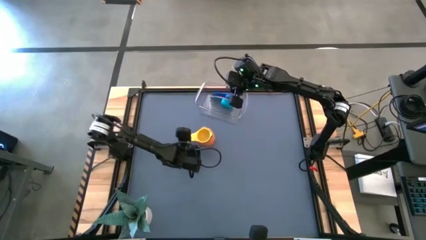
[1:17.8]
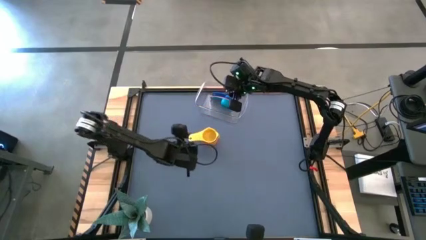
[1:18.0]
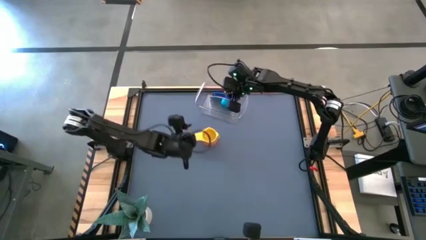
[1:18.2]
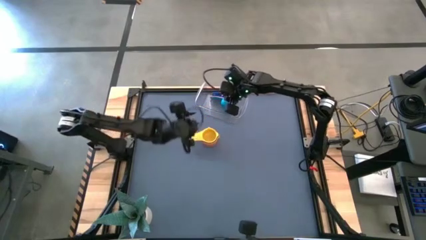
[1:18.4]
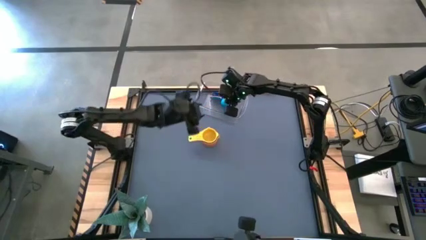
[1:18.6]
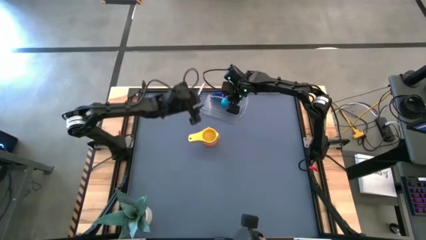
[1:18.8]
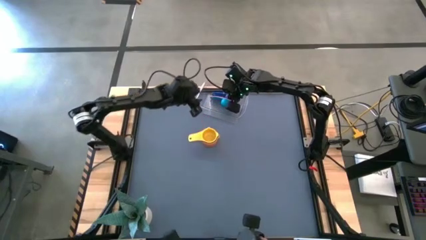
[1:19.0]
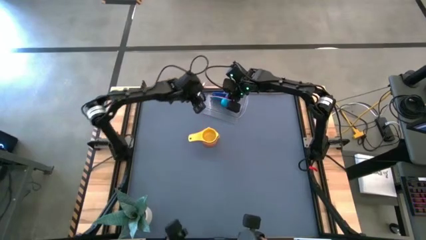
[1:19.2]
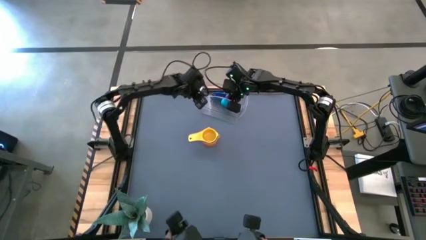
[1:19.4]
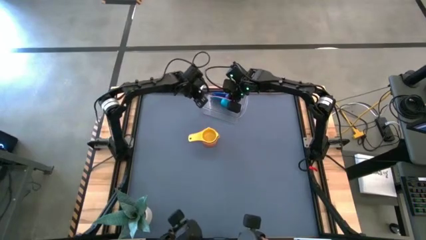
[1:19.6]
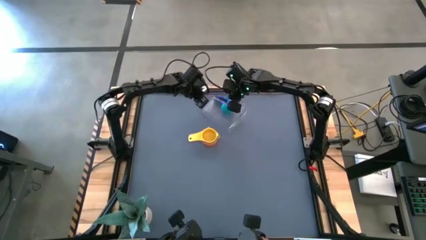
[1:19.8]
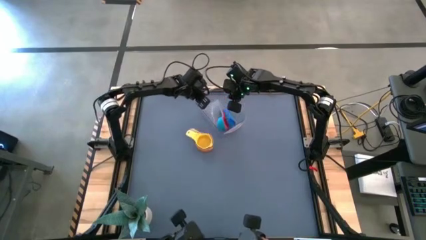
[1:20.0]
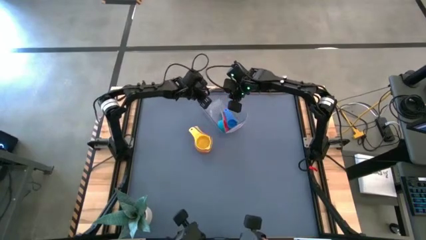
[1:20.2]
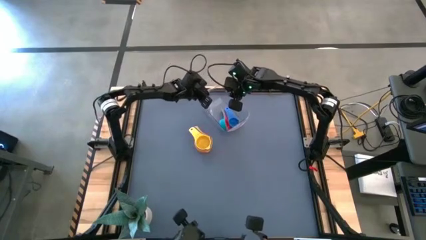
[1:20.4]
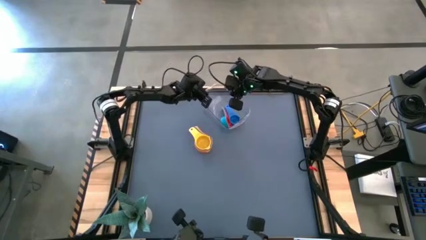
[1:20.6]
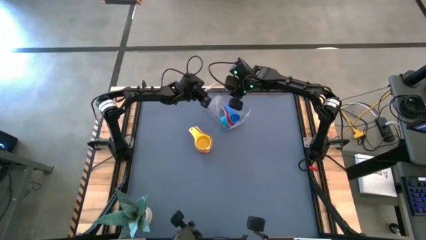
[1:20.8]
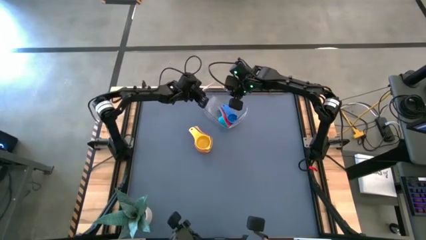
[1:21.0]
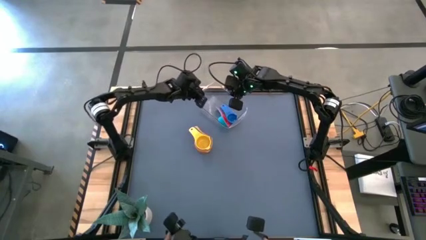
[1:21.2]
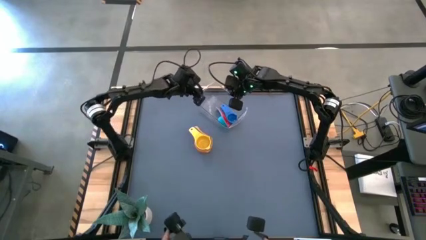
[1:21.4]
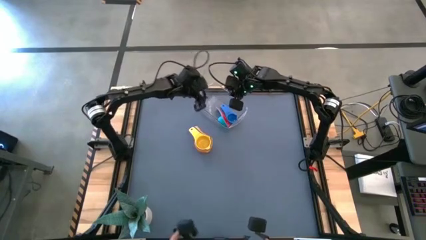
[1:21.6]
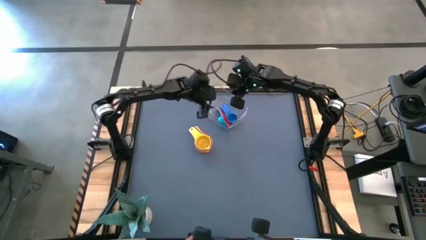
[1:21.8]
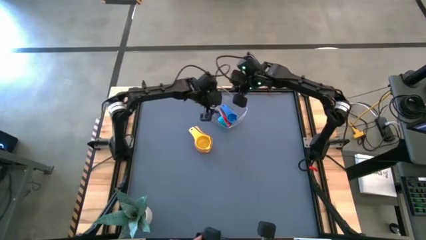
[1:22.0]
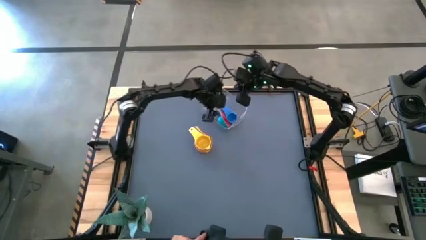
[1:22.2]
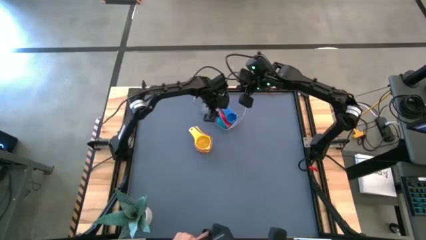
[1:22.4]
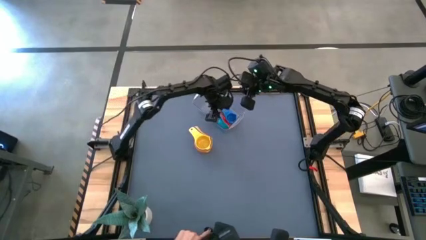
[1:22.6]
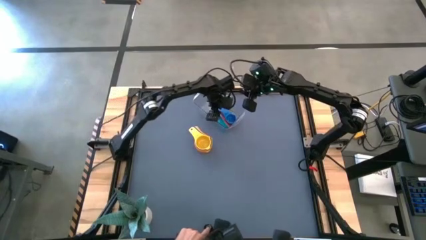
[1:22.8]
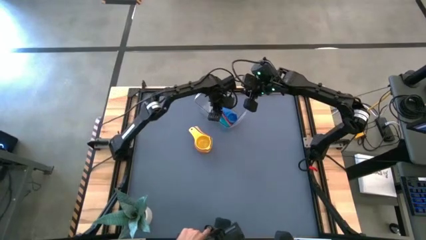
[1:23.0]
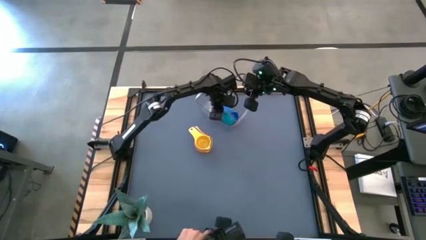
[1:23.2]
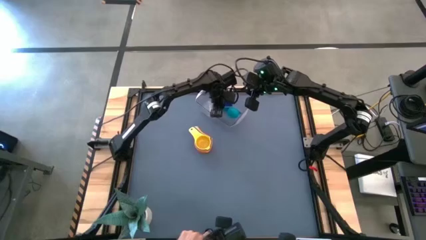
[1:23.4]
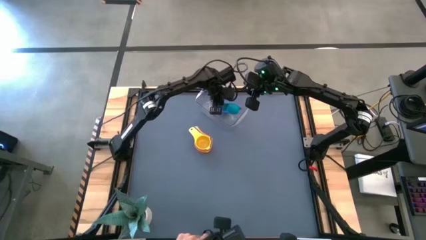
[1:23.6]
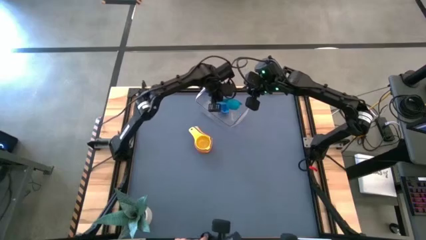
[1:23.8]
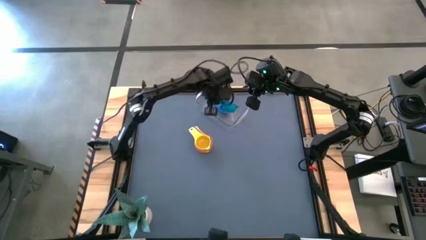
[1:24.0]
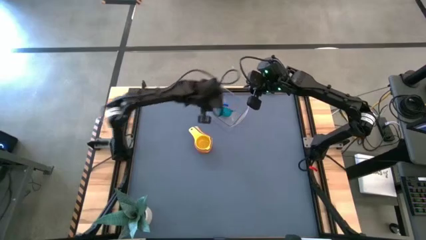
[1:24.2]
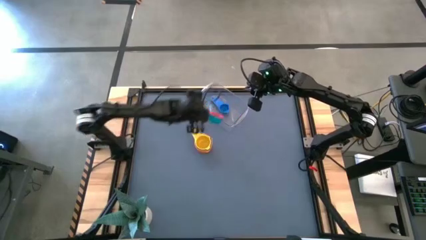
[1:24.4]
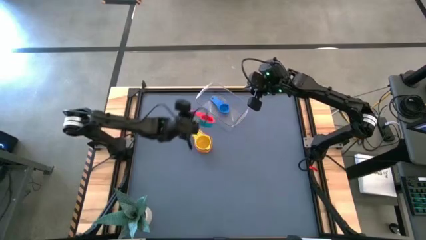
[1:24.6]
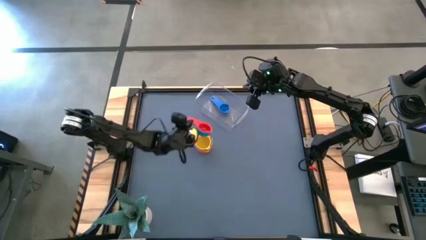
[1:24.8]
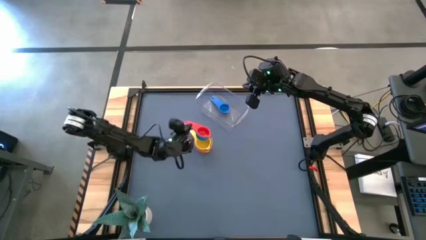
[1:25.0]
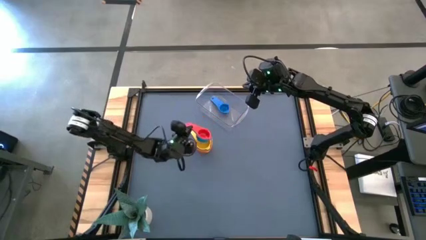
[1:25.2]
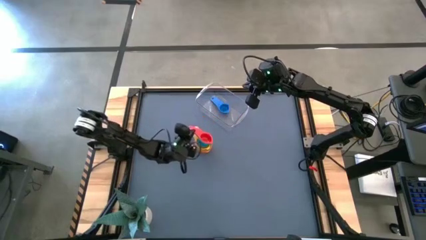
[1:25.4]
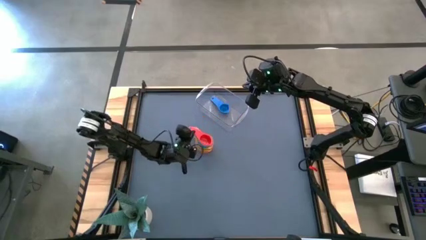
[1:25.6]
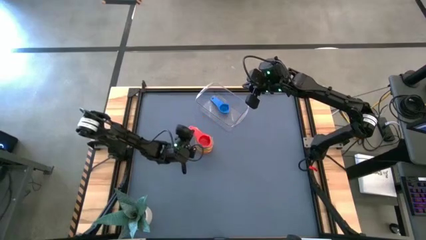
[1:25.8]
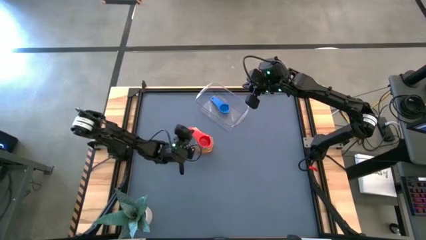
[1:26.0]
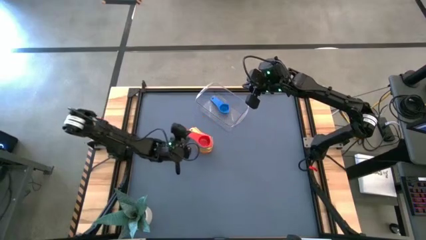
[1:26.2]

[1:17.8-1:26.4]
Task: Nest measuring cups in basket
Stack the red and light blue measuring cups on top of the yellow measuring cup

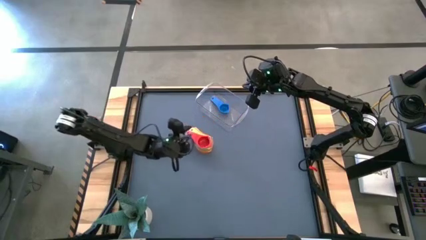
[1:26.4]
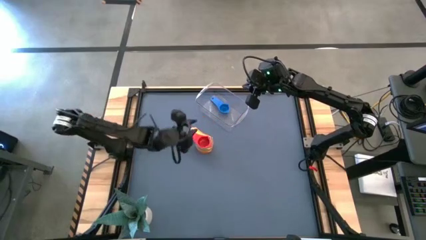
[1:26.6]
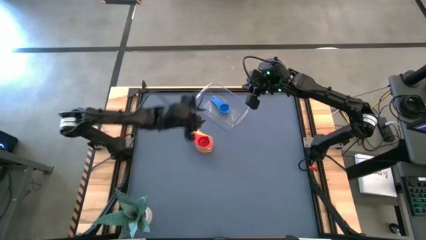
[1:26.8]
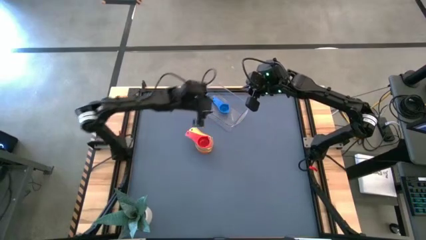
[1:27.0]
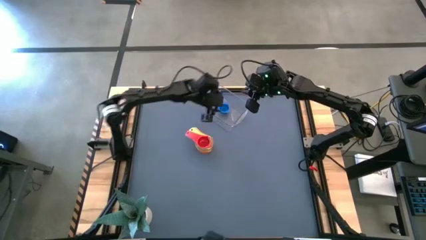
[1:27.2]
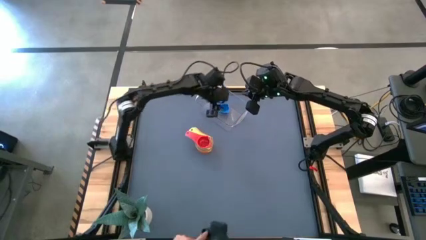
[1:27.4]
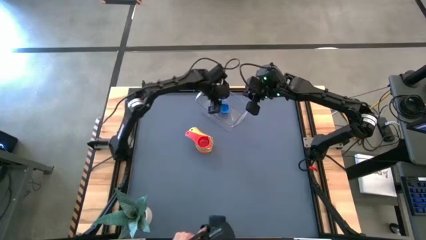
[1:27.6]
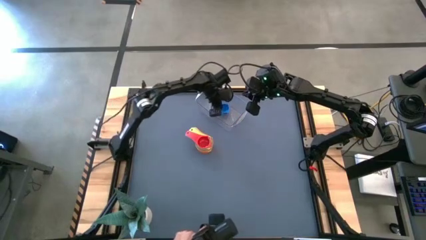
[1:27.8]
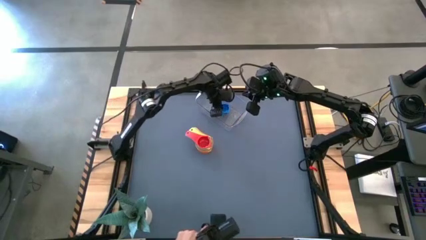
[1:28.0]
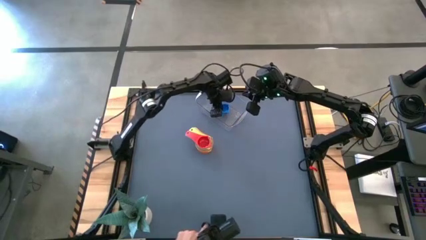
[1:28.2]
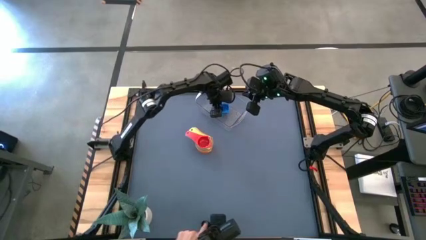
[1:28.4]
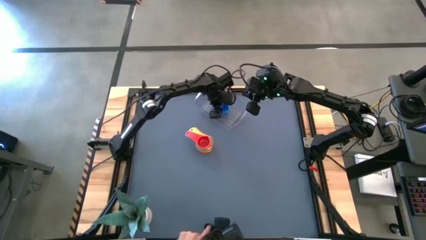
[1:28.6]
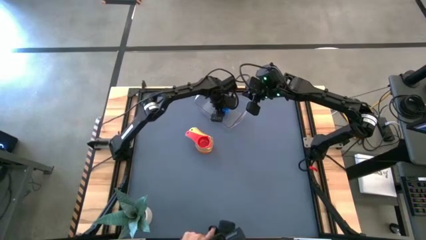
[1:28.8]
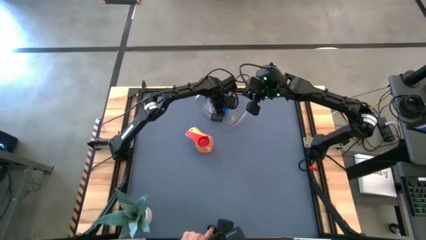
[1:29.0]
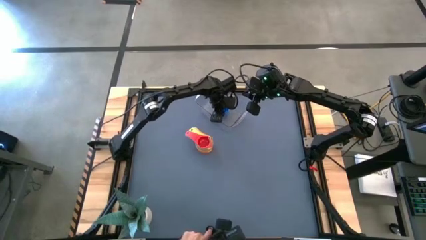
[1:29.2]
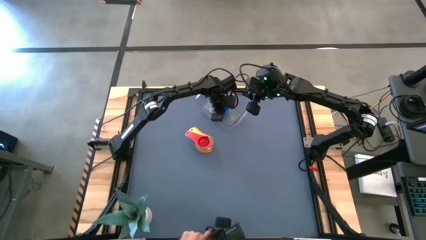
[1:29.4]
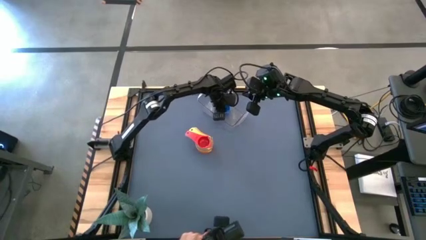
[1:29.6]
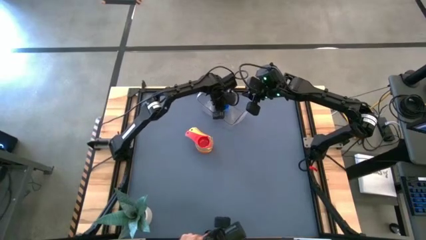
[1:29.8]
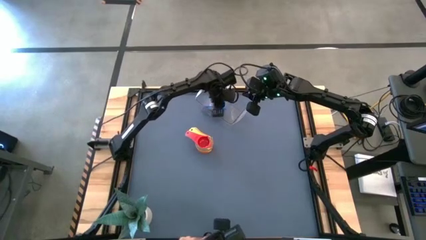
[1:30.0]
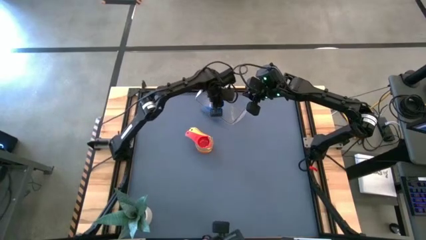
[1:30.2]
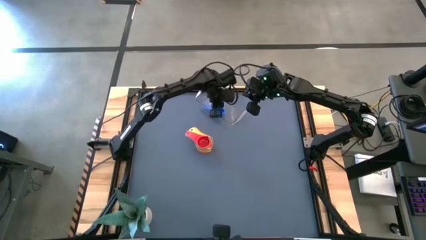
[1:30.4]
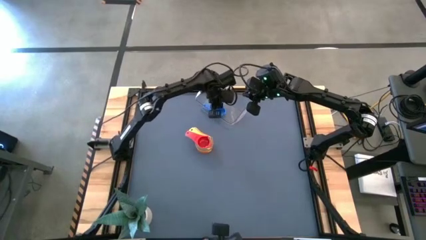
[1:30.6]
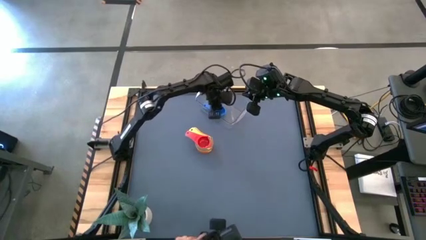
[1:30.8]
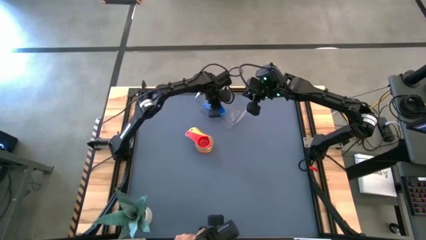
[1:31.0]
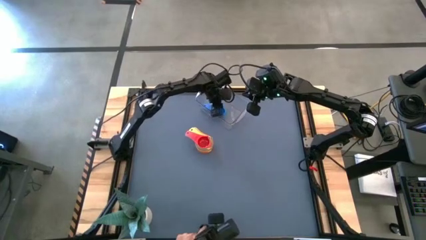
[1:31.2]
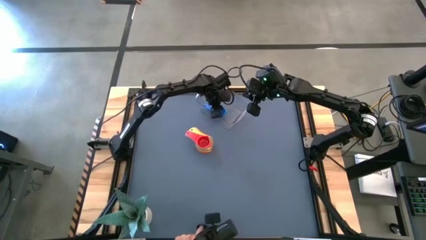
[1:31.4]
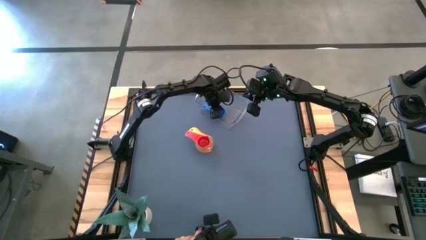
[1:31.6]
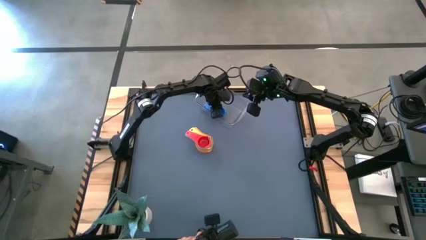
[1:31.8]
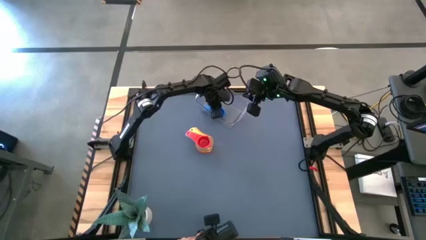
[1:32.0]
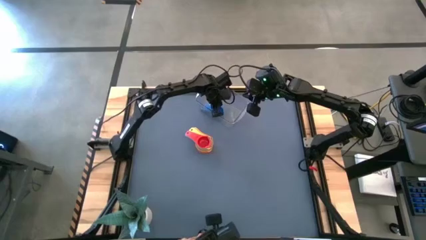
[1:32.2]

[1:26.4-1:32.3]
Stack the blue measuring cup on top of the red measuring cup

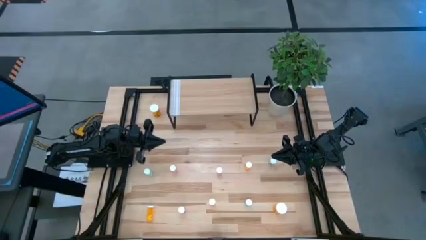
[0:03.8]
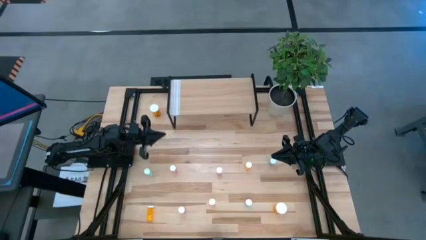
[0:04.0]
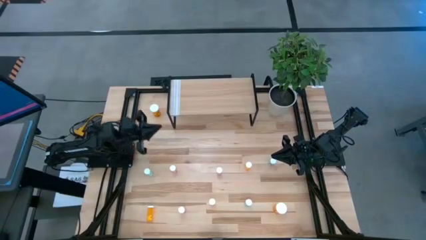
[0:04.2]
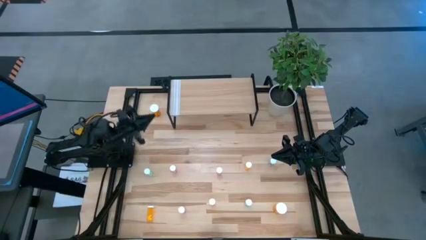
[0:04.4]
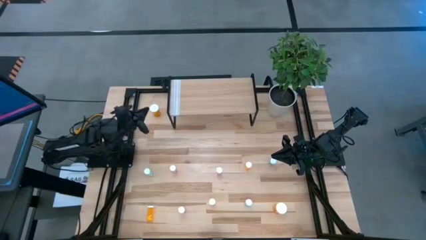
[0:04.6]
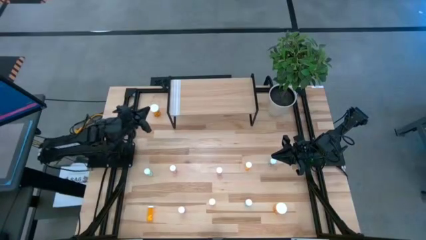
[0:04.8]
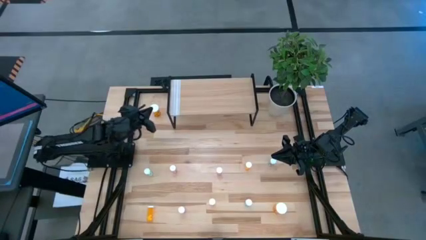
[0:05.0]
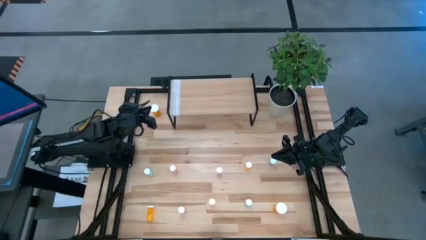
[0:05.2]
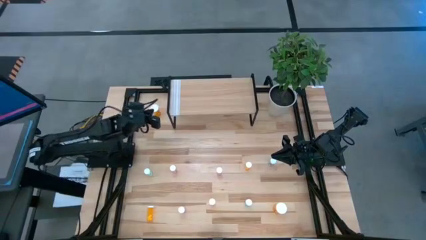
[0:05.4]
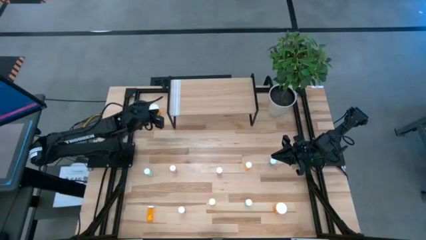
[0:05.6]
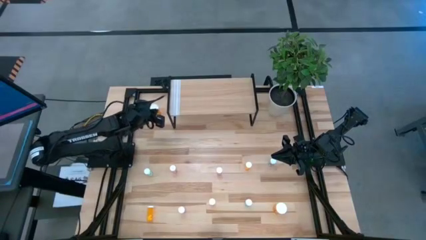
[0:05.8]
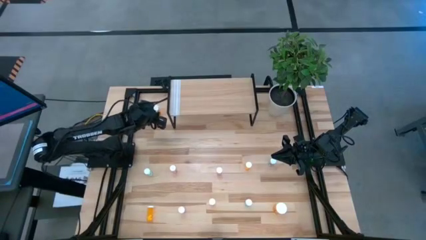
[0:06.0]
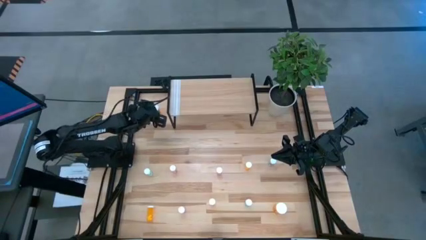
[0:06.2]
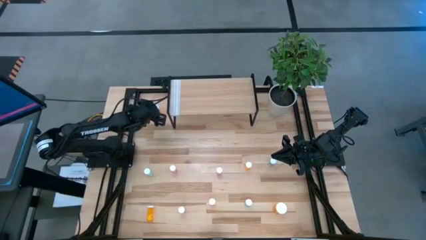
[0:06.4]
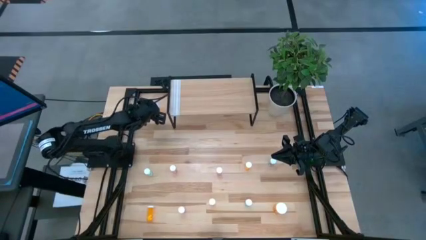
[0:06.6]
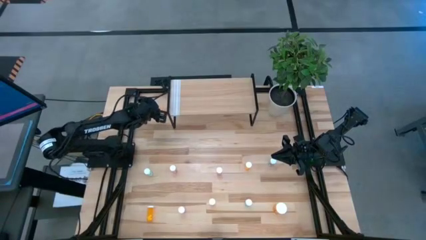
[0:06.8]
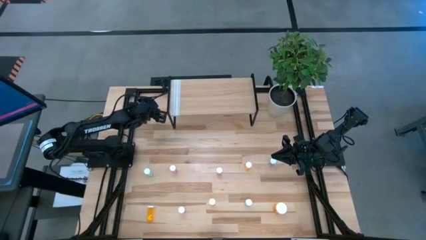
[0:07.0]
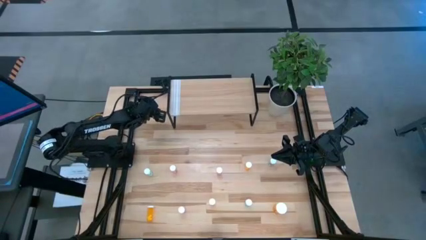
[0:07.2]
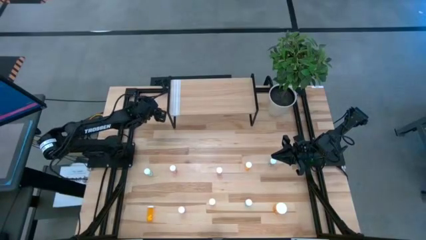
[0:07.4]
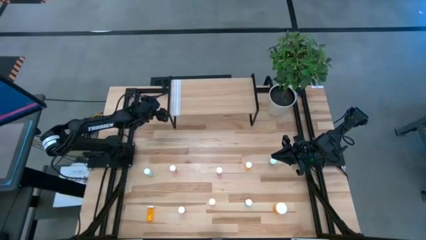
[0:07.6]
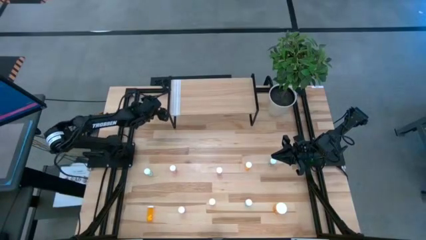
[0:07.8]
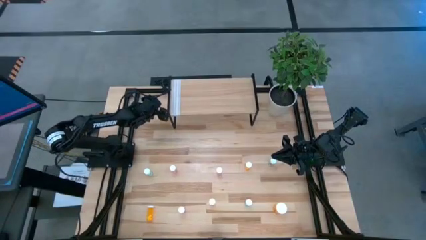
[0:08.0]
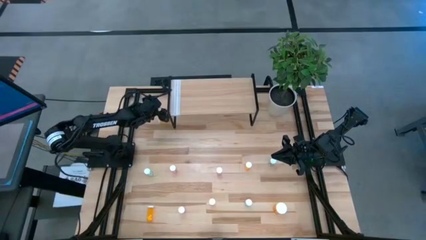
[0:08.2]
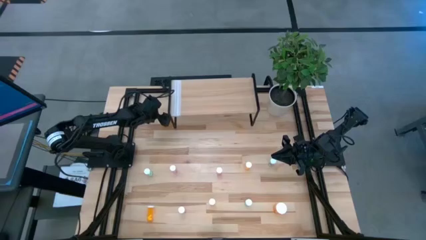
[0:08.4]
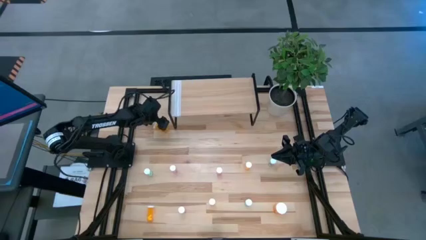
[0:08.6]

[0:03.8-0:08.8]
Task: Pick and place medicine bottles onto shelf by color
Put the top large orange pill bottle on the shelf
